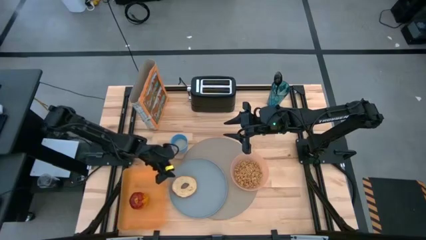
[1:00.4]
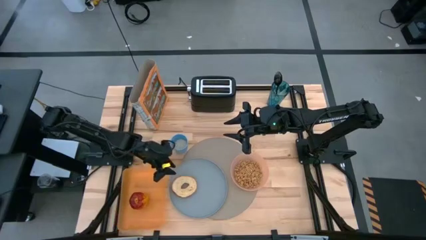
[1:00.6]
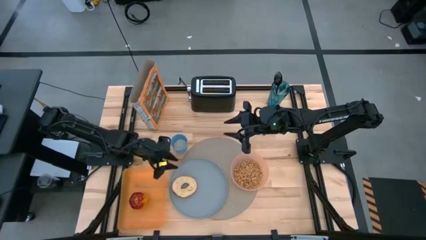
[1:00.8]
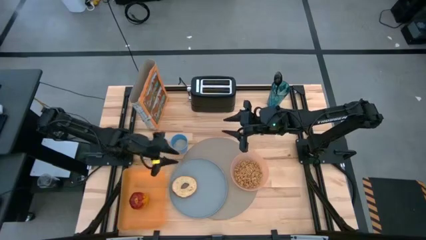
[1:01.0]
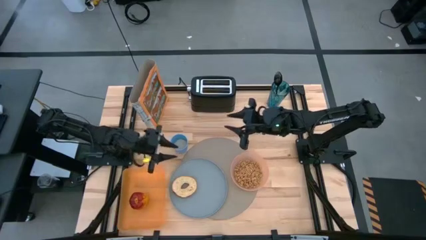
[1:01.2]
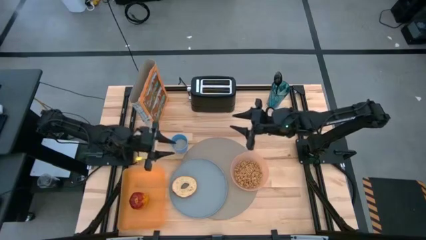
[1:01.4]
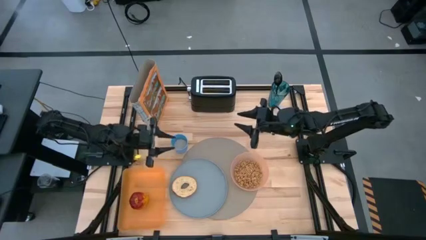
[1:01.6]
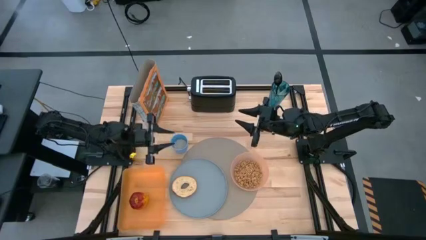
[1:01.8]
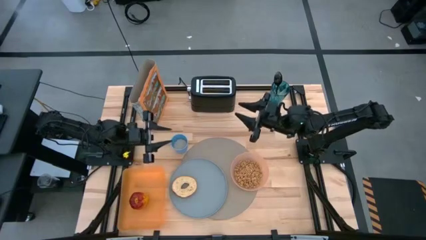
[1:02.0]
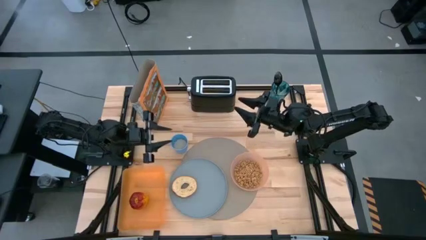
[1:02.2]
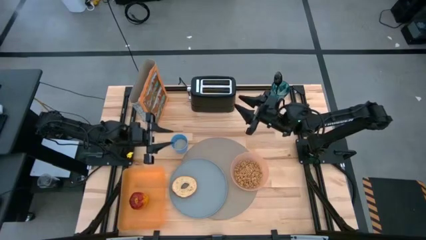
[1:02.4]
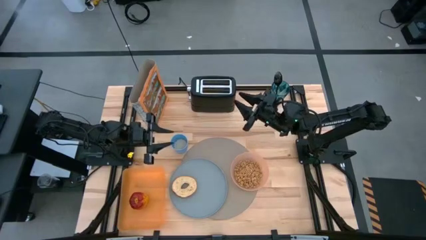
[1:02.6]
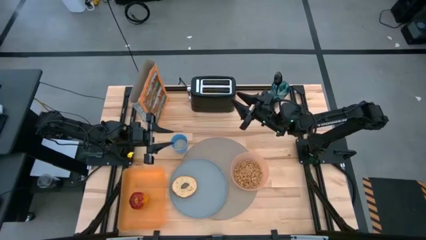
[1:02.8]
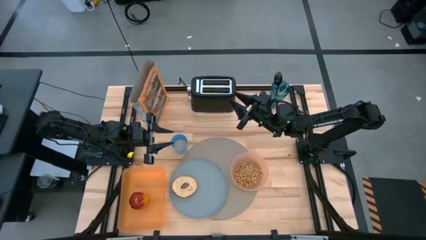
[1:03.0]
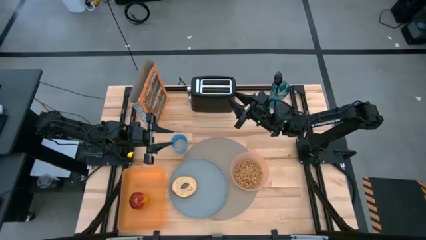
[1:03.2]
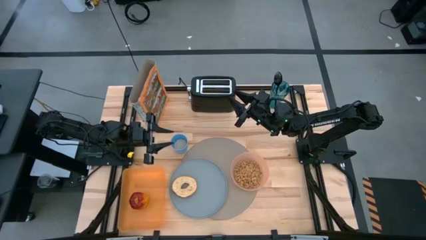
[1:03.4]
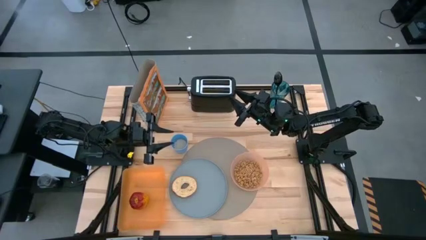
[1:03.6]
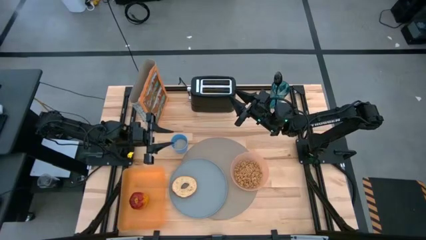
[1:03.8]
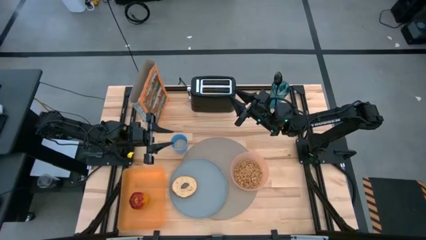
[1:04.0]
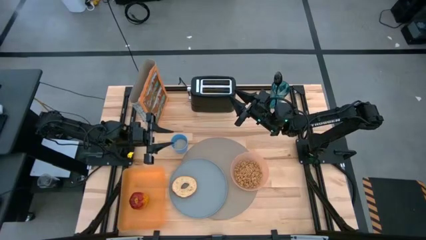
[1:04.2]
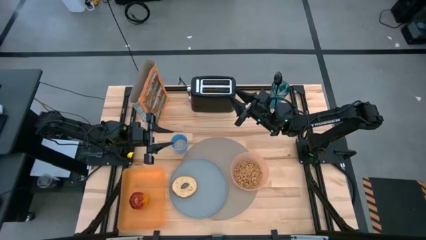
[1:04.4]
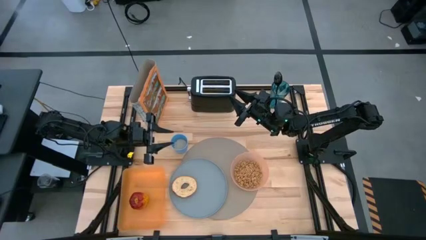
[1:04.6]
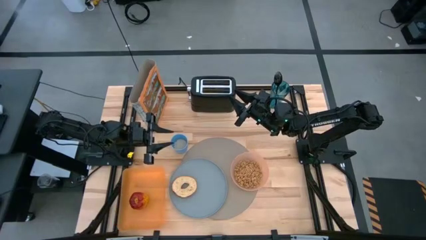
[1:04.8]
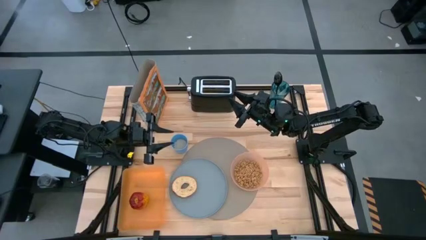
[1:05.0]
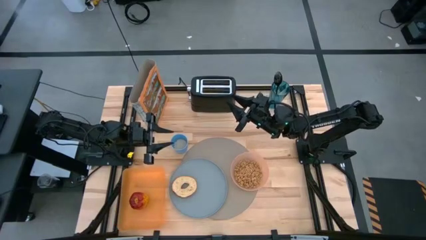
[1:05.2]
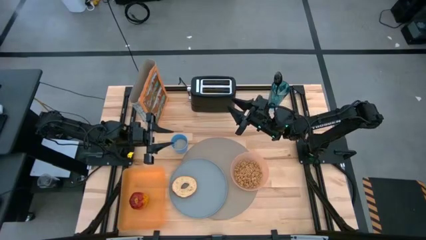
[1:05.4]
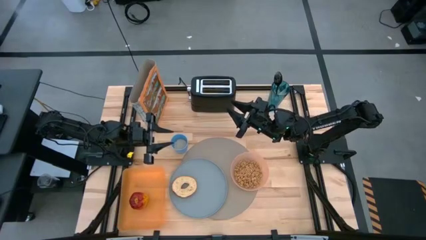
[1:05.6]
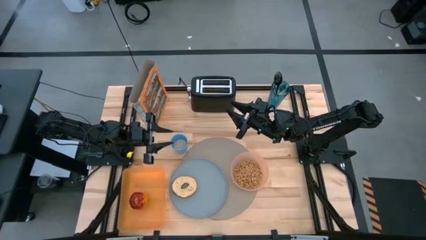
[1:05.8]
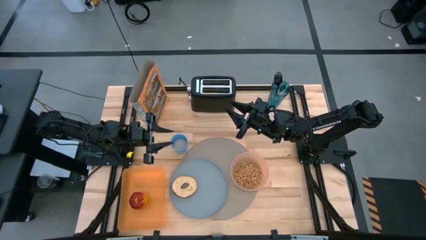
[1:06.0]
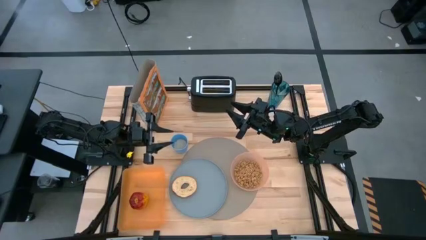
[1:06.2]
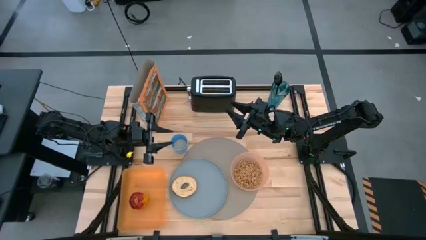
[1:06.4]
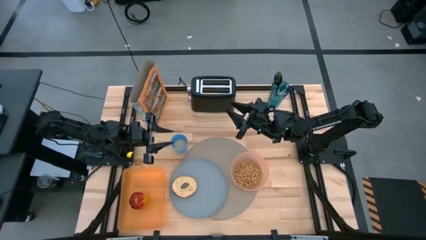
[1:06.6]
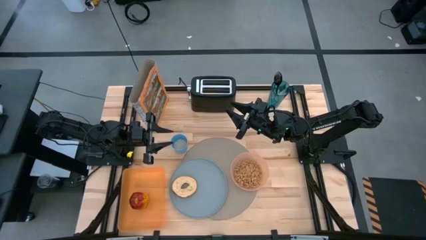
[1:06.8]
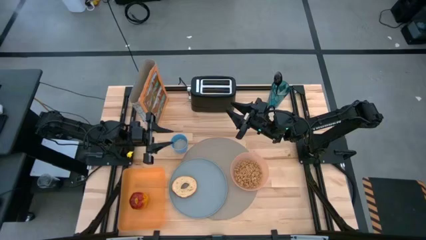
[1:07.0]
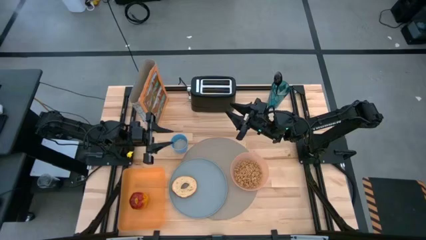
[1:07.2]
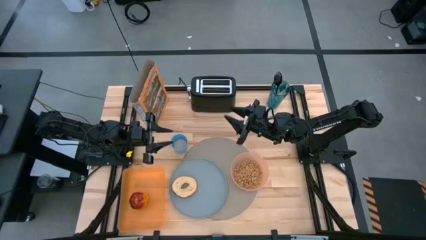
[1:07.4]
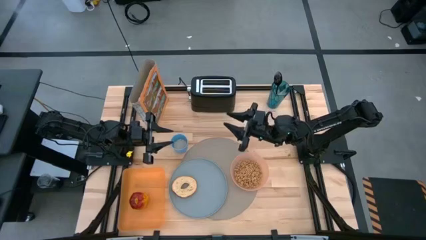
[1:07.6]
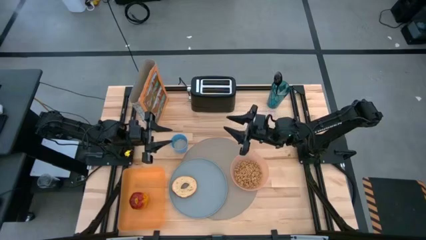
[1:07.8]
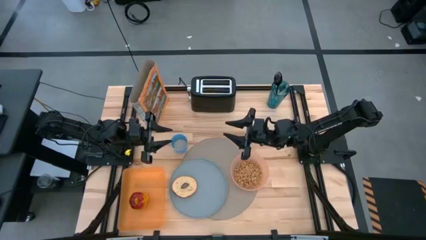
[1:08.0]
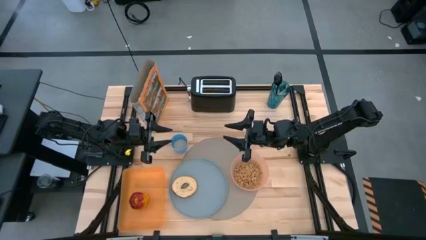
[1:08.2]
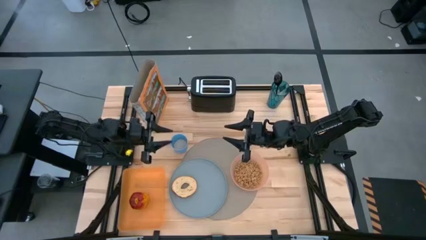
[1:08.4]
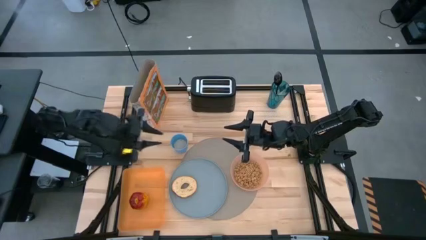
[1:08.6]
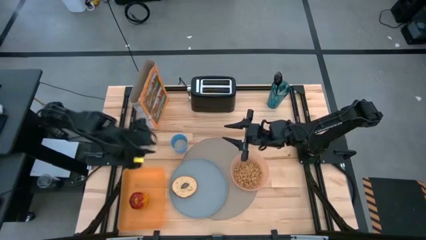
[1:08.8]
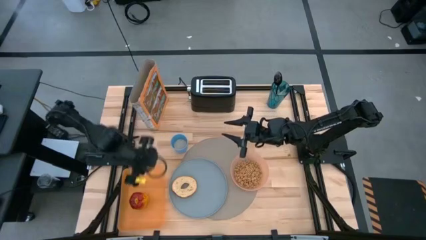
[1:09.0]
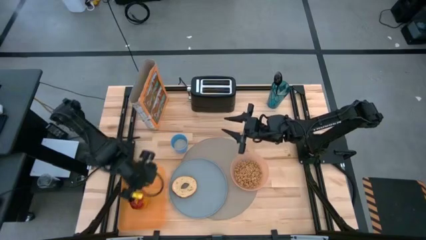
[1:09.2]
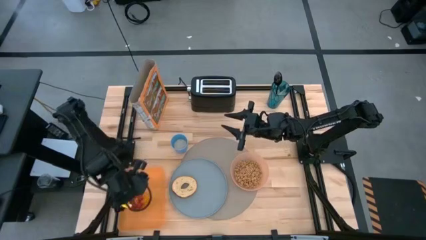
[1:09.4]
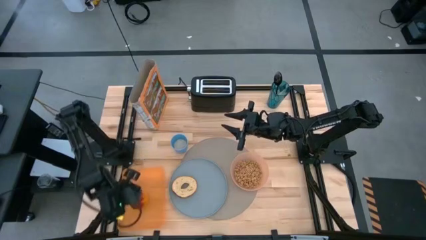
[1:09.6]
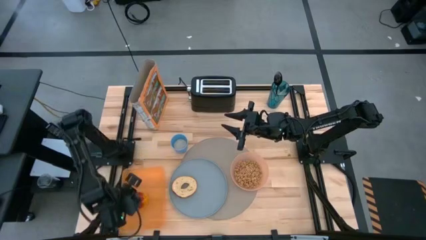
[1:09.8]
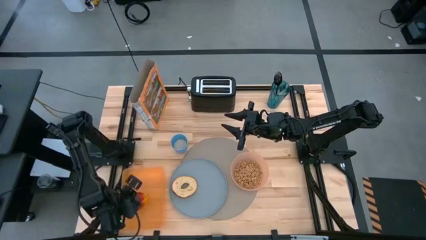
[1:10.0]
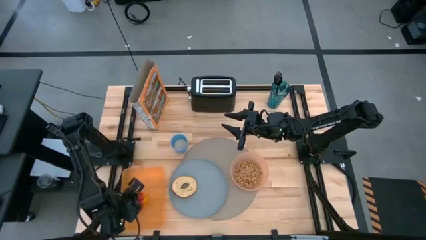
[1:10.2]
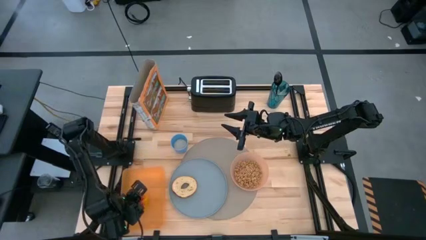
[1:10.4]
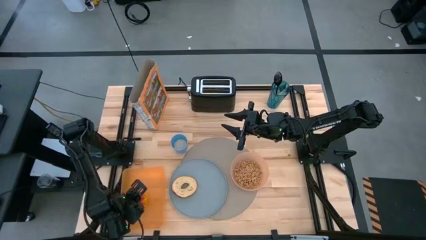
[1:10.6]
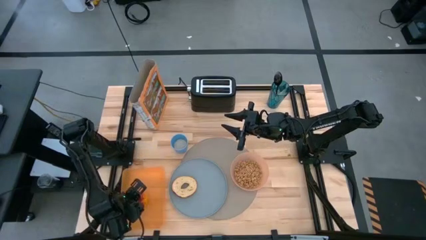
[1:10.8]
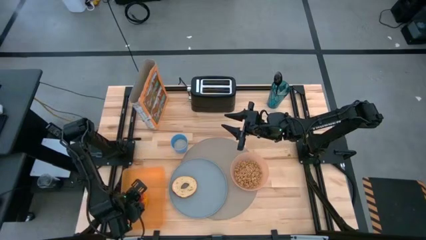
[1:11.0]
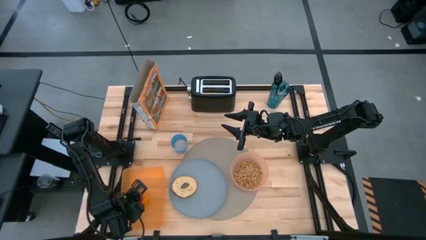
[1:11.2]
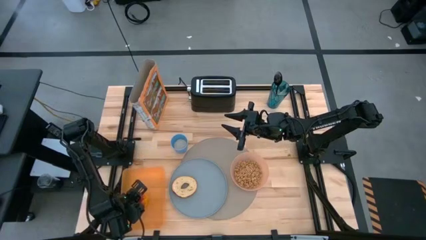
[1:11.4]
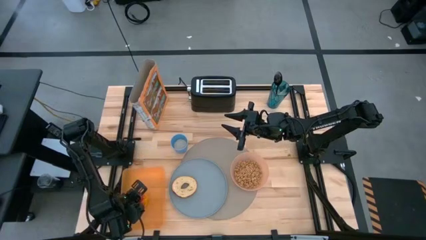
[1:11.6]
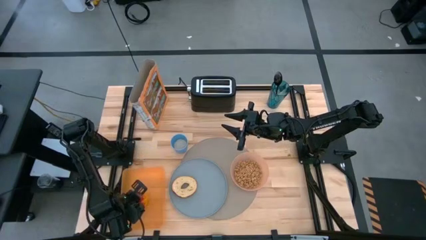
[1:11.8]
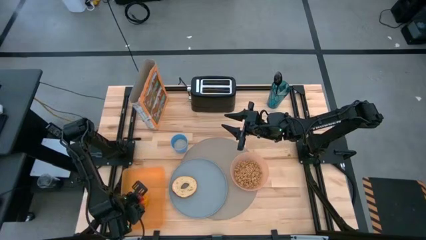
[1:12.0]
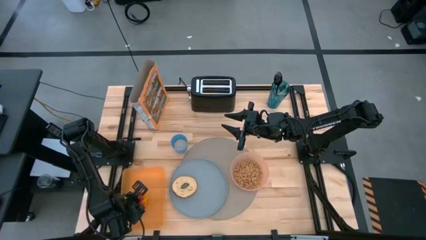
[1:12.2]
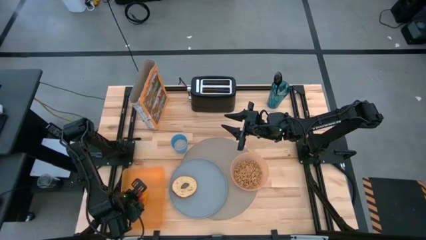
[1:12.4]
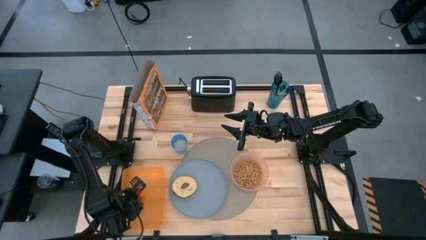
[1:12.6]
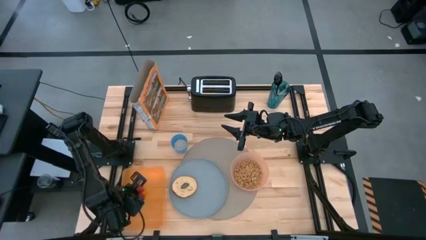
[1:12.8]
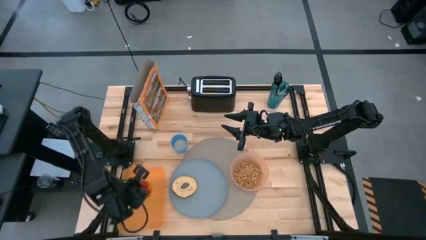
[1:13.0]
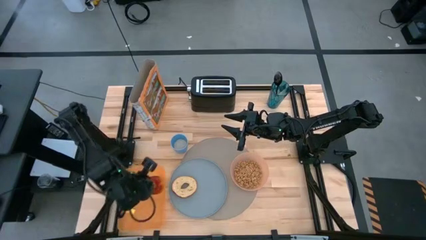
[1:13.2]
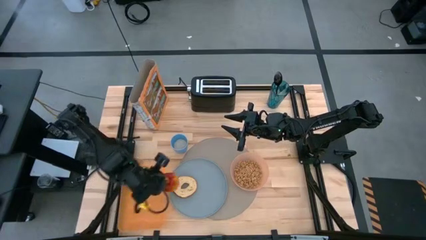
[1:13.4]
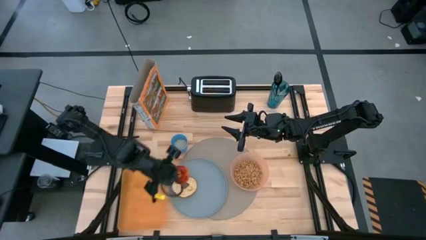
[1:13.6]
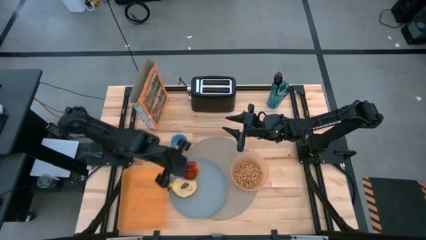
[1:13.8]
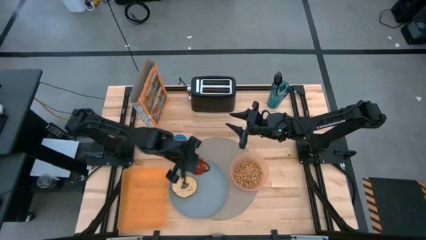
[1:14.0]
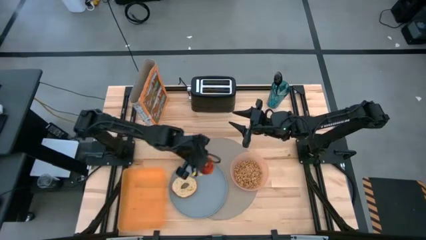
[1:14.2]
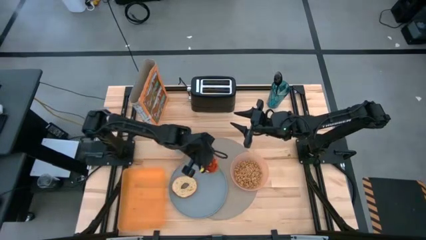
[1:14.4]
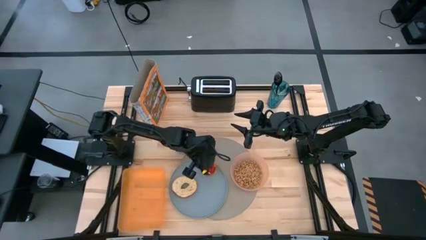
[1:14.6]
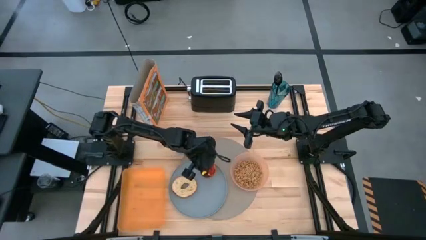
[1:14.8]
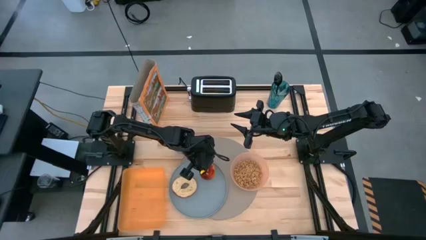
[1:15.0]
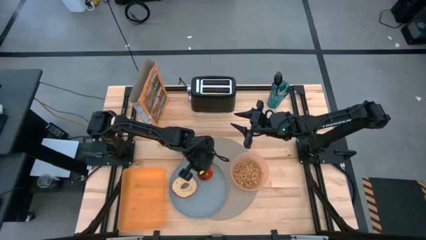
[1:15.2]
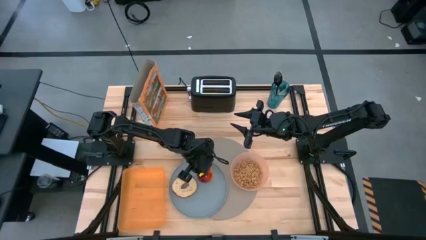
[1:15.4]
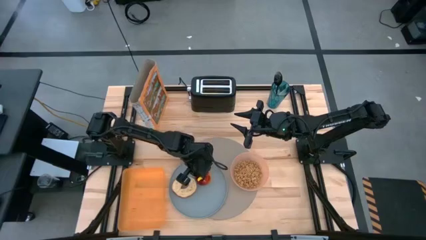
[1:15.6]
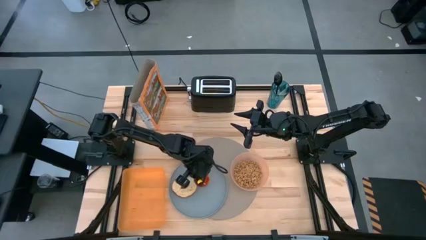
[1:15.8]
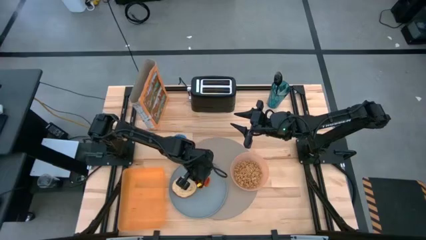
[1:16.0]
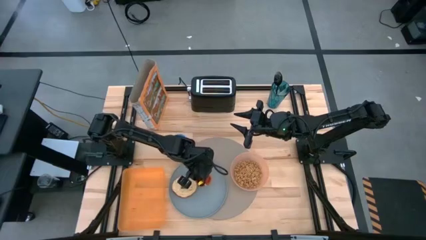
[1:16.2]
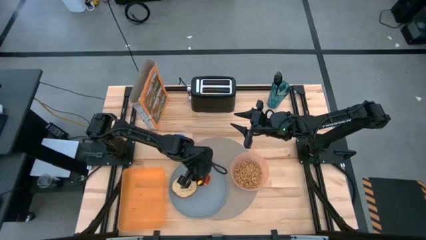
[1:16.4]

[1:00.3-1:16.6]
Task: Arrange a breakfast setting
Put the apple on the blue plate
